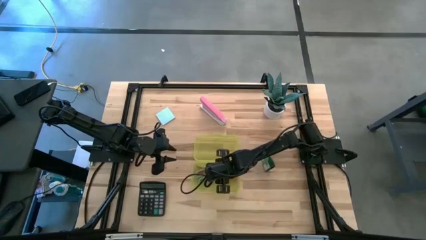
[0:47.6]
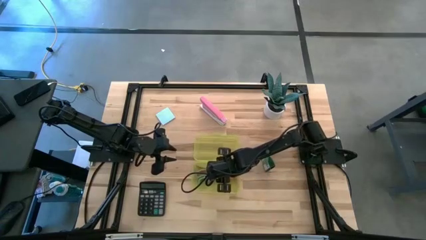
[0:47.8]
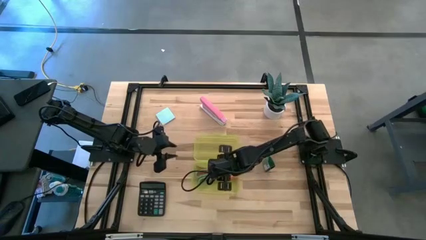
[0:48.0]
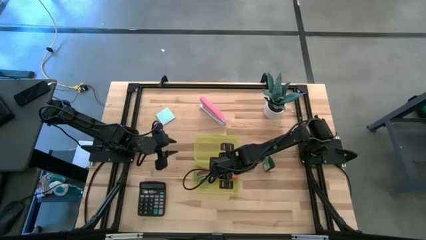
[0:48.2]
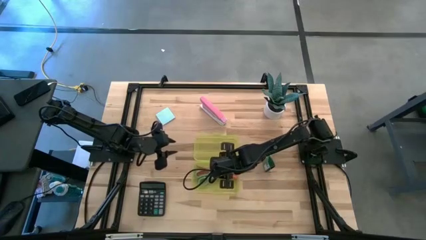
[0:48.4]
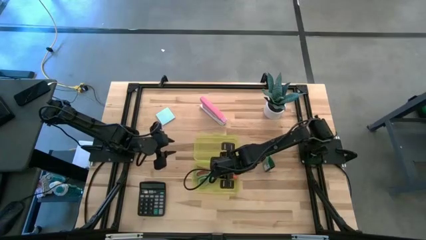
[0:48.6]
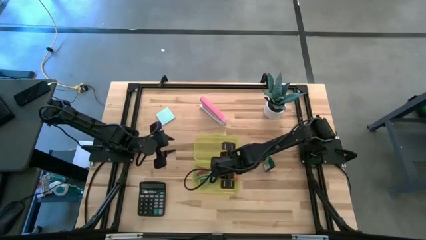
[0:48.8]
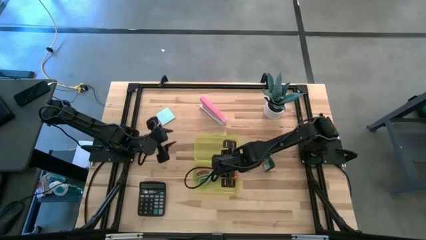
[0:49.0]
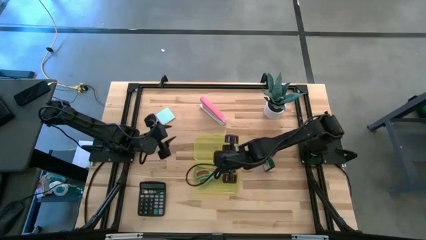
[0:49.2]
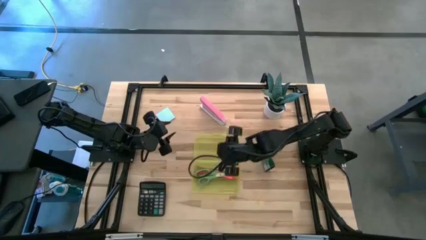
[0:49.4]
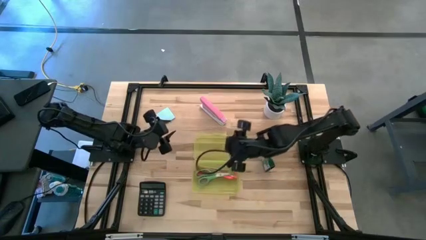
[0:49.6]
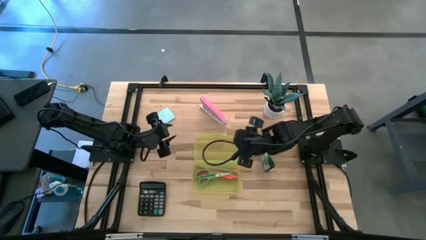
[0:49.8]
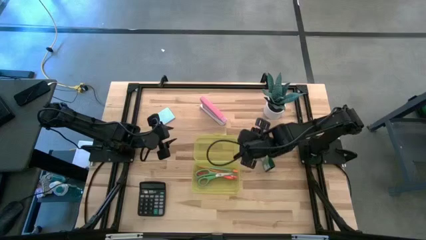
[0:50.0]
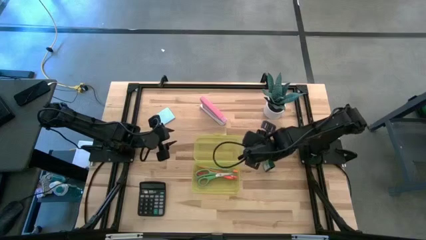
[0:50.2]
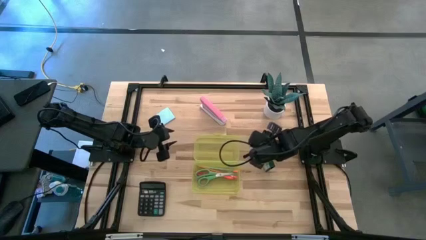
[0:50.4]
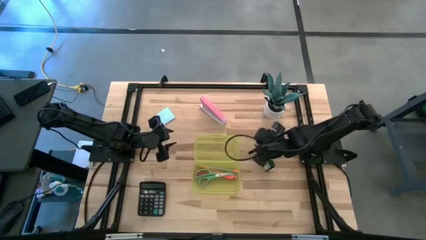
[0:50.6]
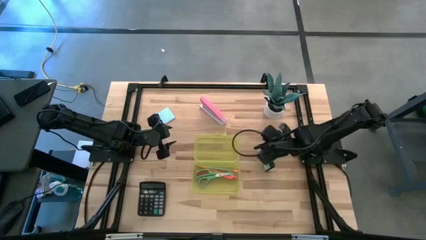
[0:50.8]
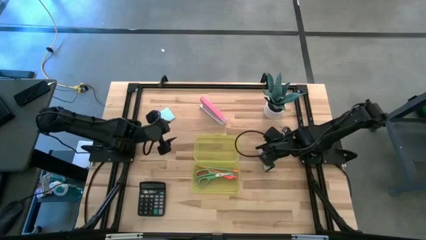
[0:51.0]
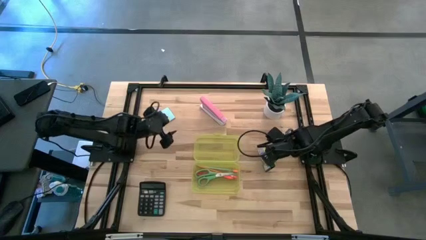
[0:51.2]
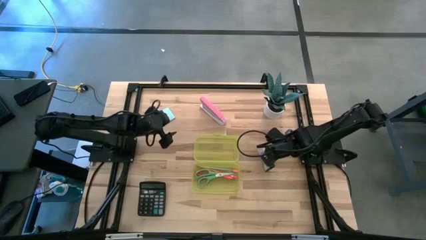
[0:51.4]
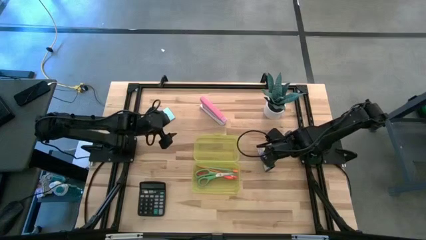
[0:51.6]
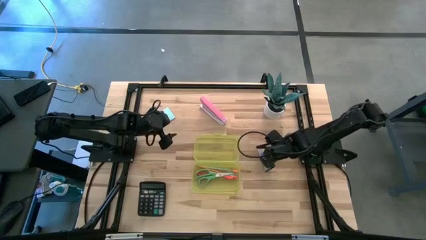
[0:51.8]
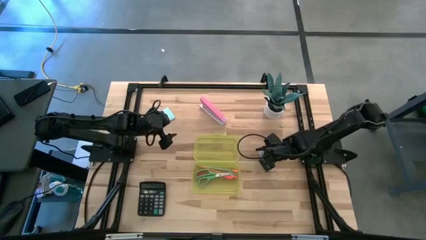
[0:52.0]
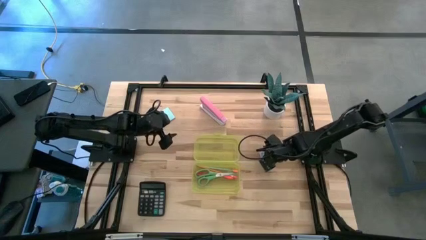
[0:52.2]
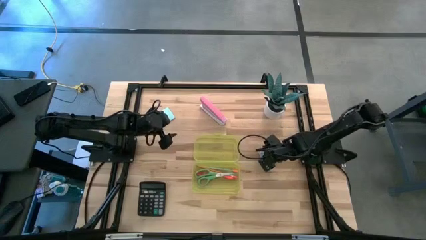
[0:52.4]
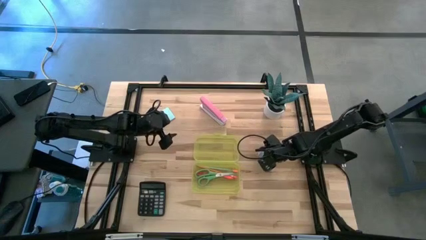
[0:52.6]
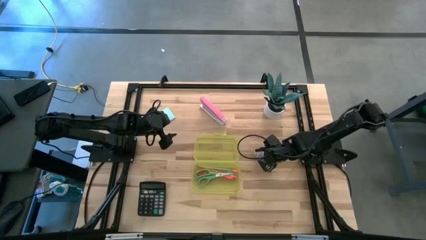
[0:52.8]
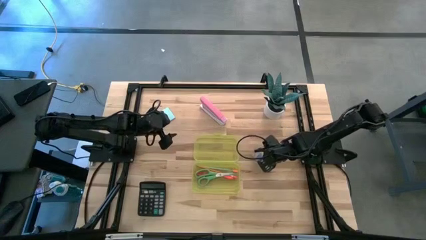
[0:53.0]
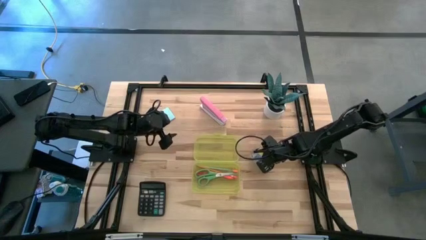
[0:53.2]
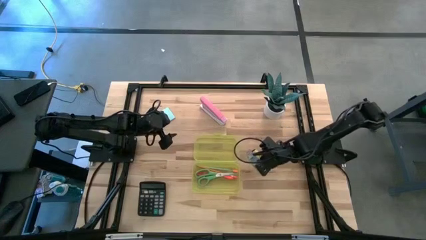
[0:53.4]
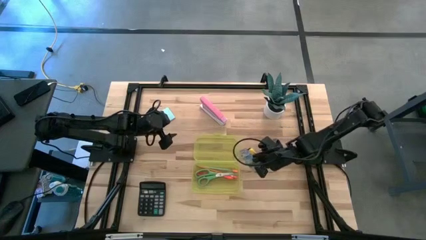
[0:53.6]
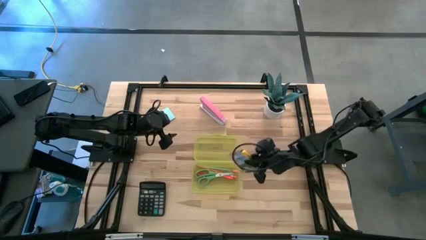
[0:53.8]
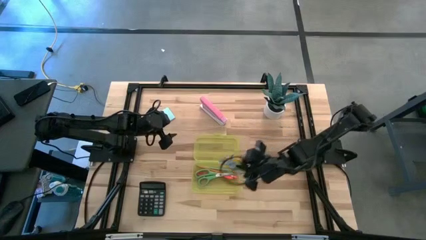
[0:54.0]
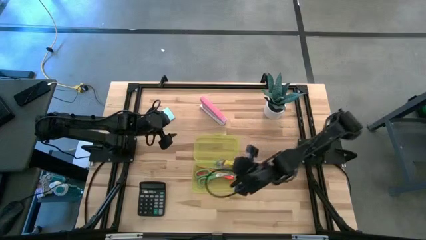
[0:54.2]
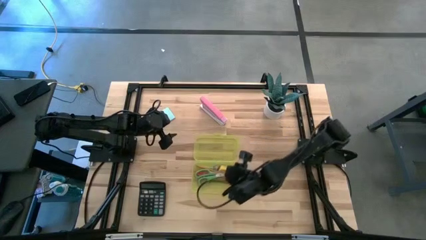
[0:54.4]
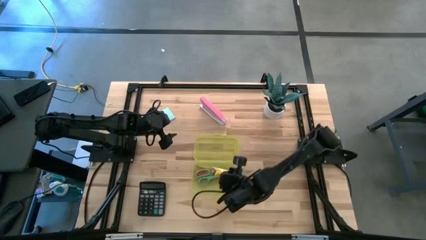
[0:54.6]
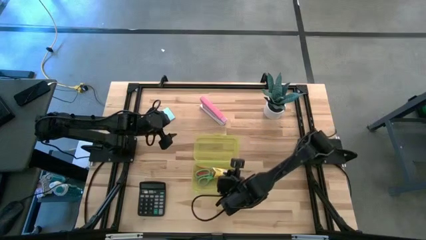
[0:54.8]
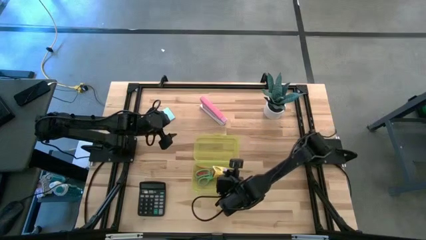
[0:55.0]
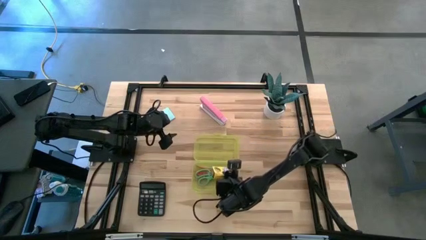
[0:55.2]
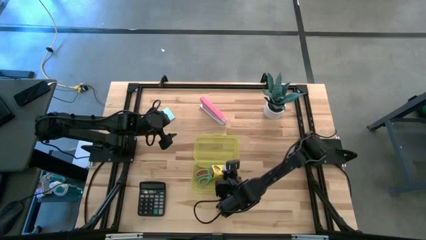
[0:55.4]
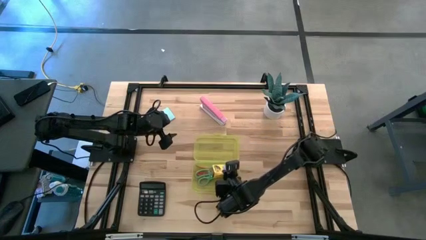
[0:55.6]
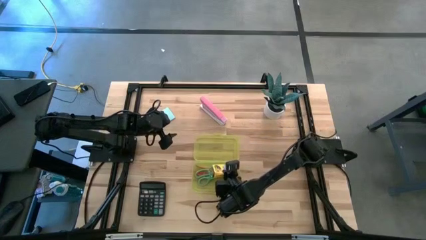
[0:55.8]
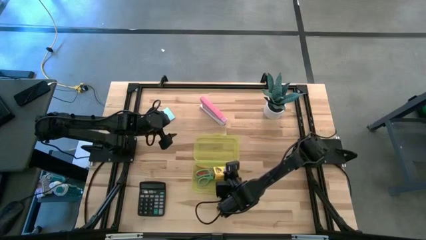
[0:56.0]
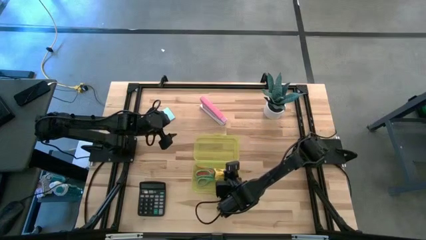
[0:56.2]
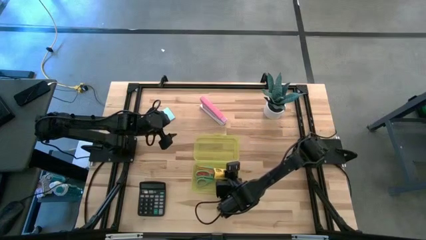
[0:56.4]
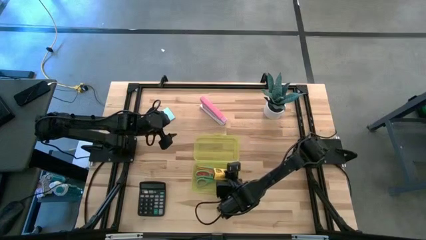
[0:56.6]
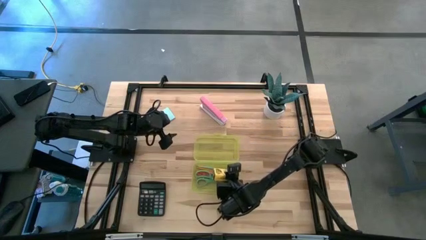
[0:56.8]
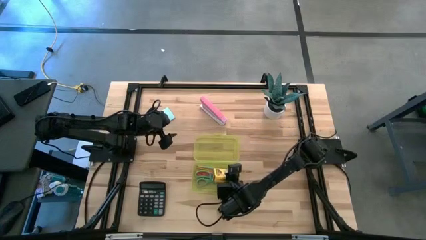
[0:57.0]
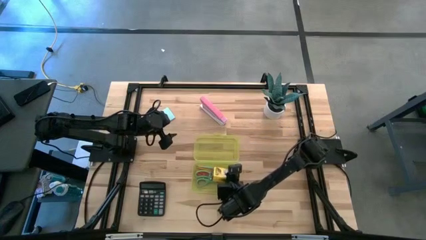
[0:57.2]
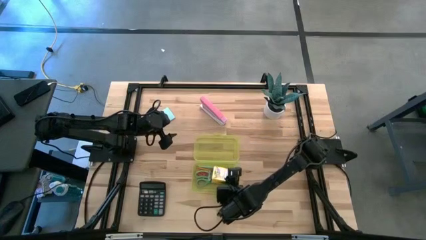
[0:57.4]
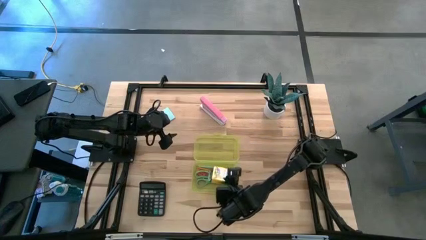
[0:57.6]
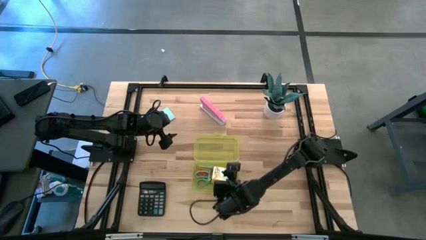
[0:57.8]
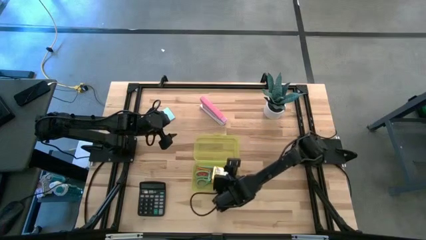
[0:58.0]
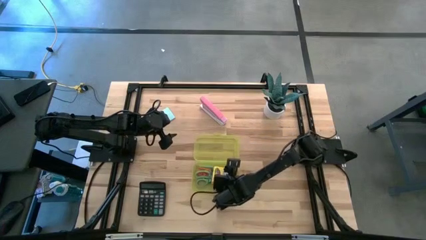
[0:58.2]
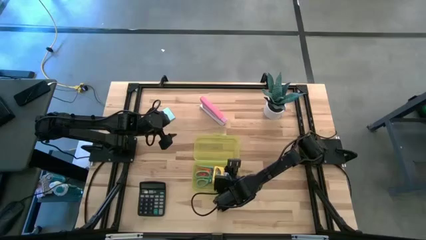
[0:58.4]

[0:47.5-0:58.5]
Task: Pack school essentials
Put the crayon box into the yellow supply box
